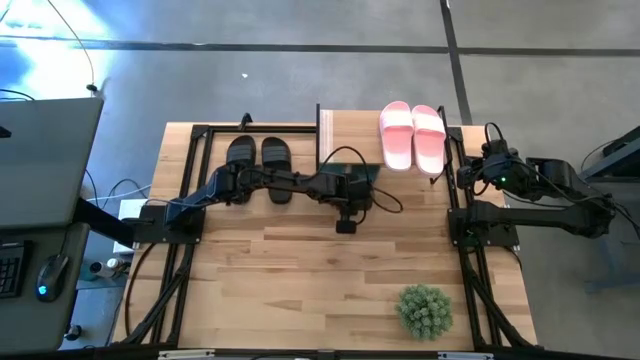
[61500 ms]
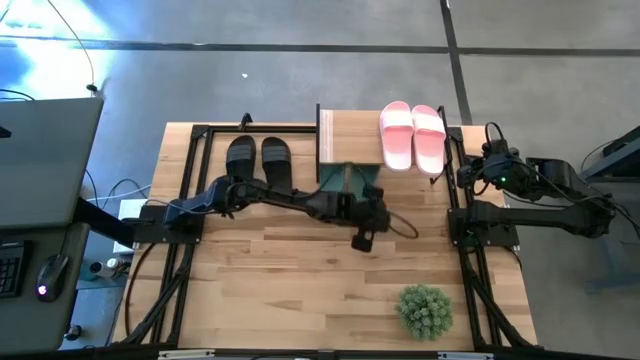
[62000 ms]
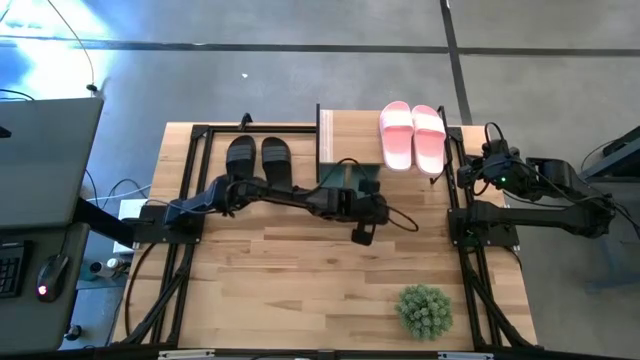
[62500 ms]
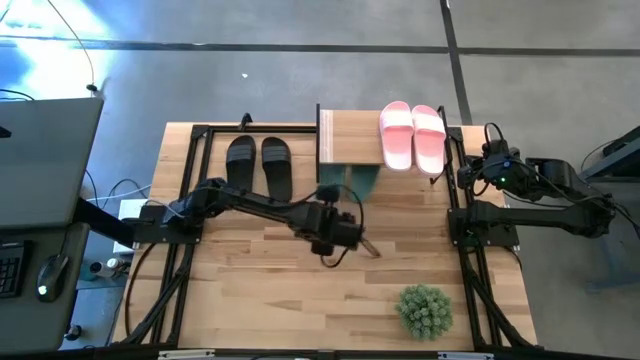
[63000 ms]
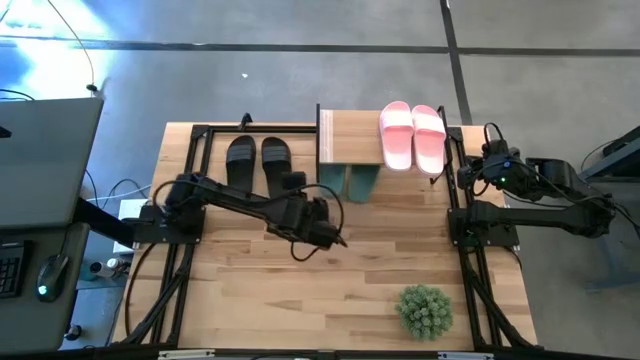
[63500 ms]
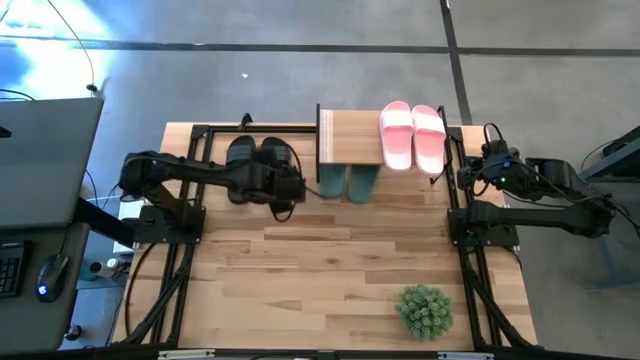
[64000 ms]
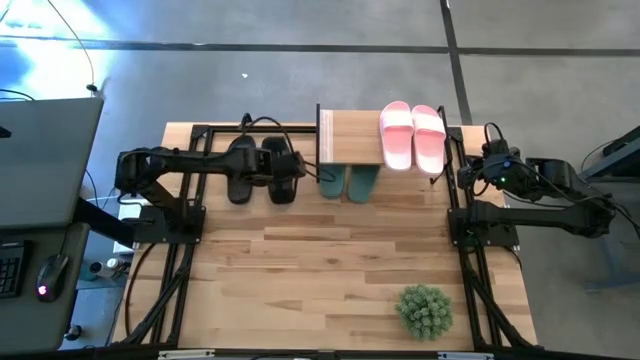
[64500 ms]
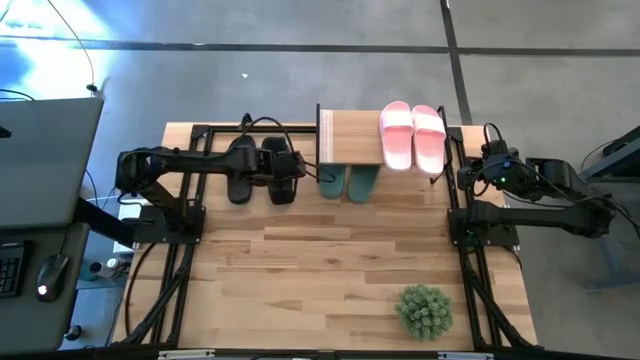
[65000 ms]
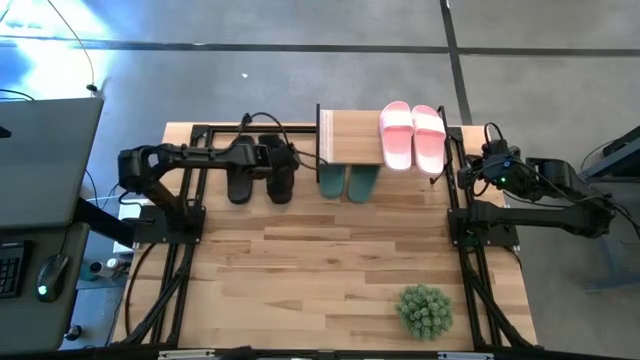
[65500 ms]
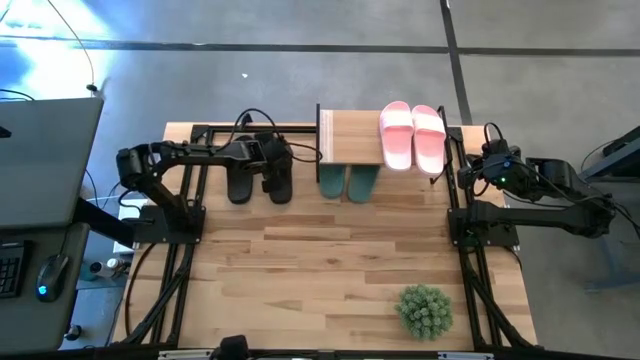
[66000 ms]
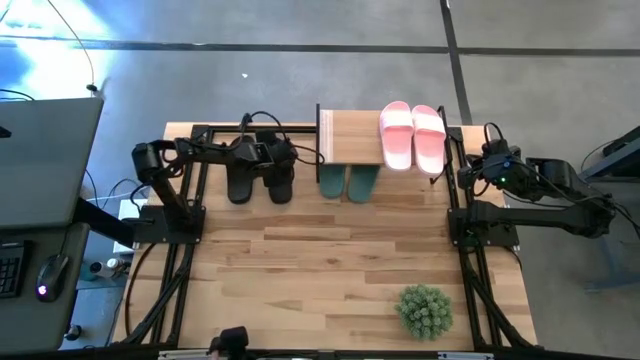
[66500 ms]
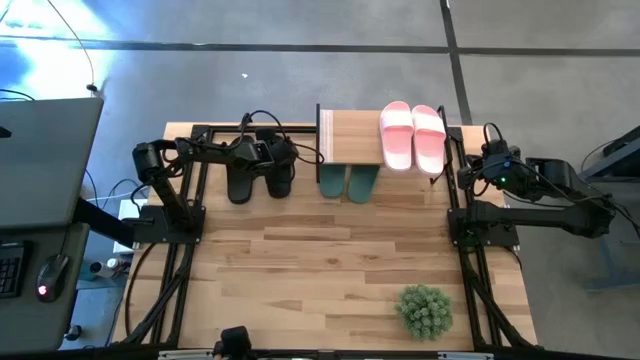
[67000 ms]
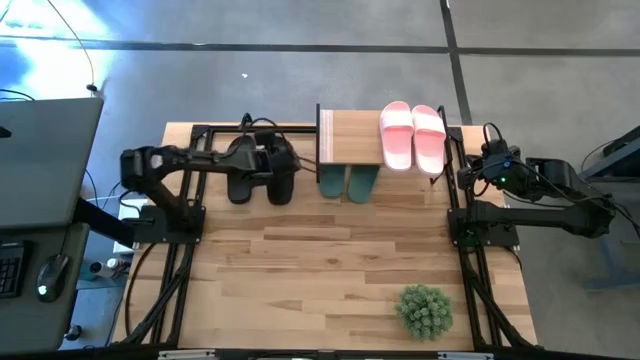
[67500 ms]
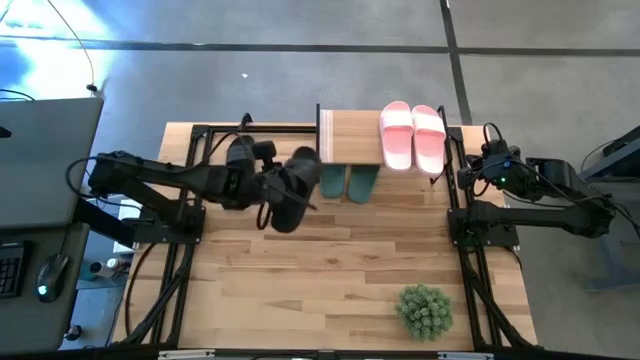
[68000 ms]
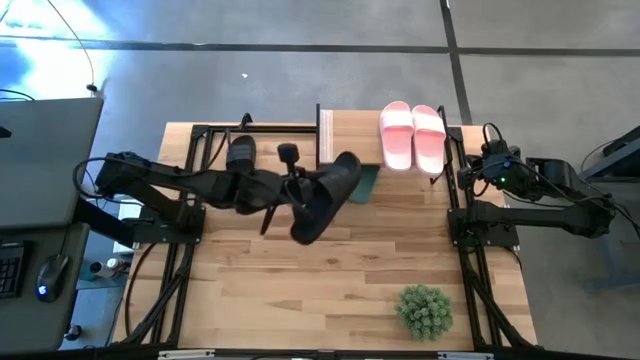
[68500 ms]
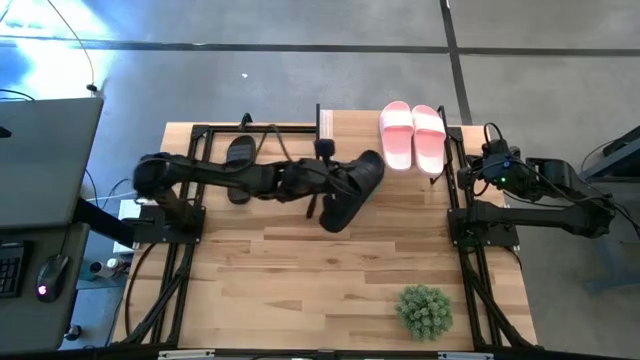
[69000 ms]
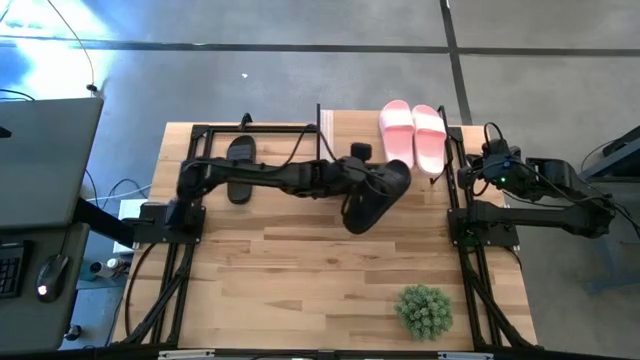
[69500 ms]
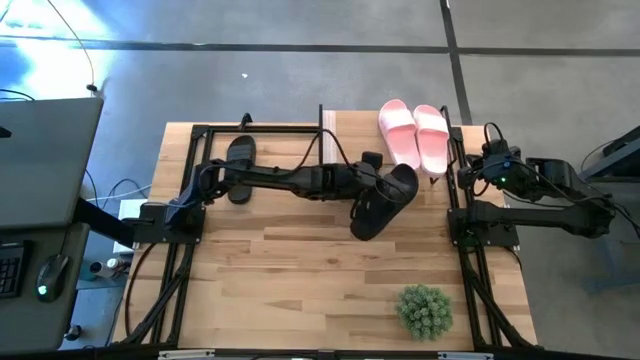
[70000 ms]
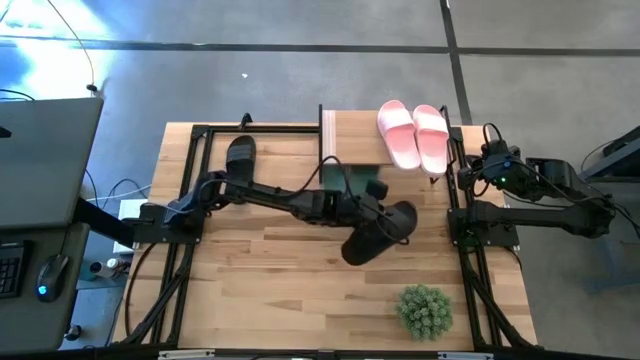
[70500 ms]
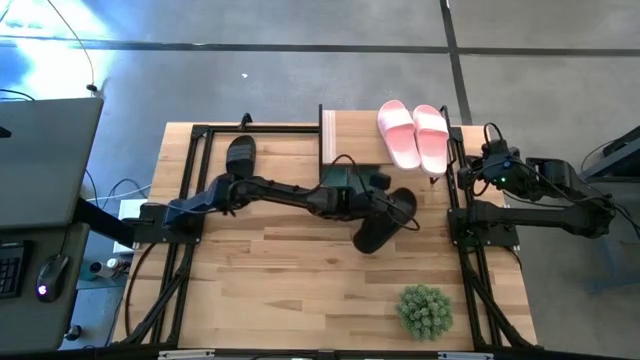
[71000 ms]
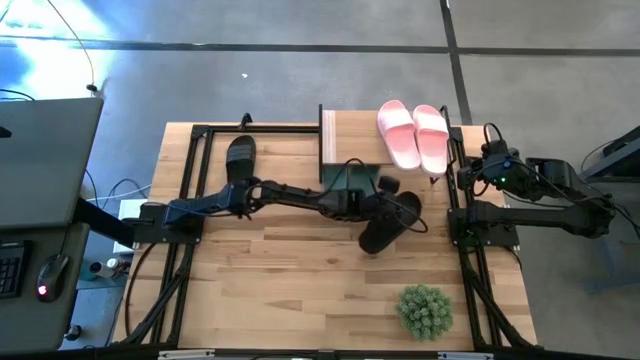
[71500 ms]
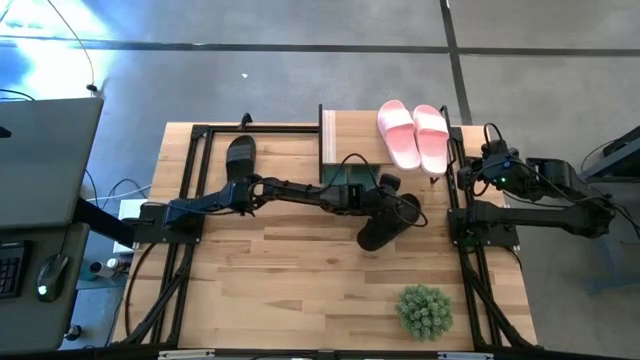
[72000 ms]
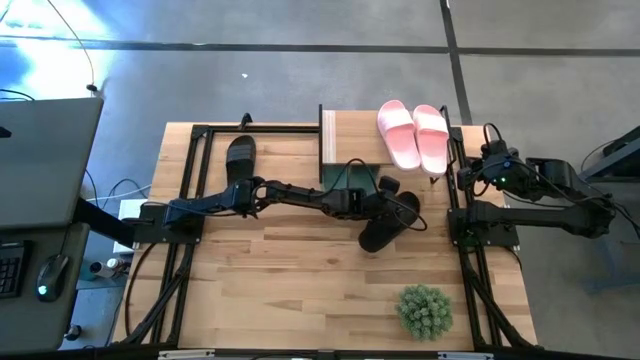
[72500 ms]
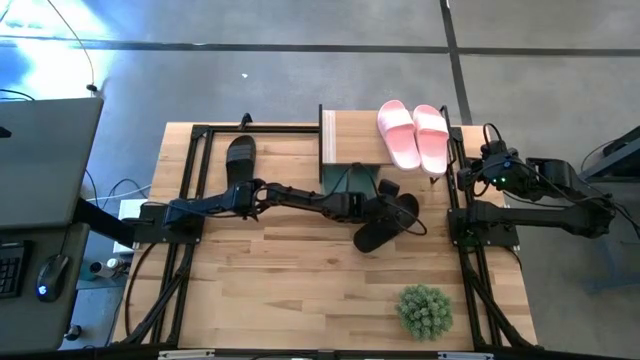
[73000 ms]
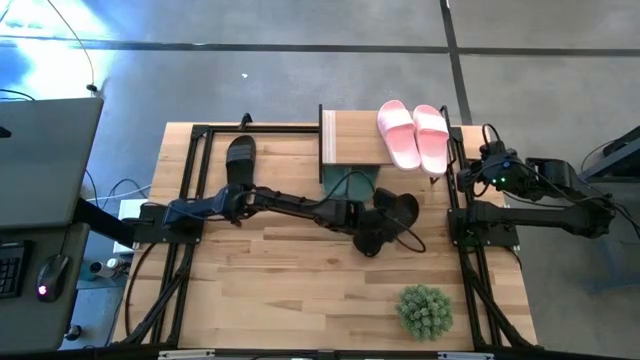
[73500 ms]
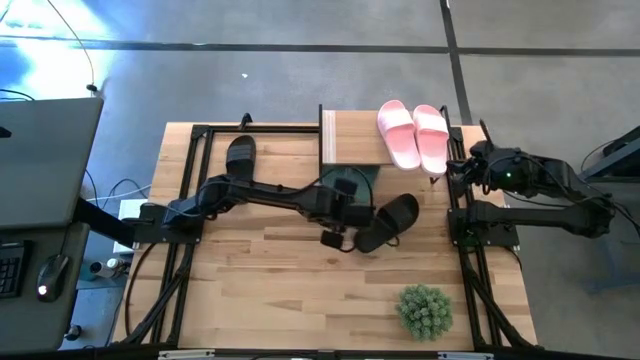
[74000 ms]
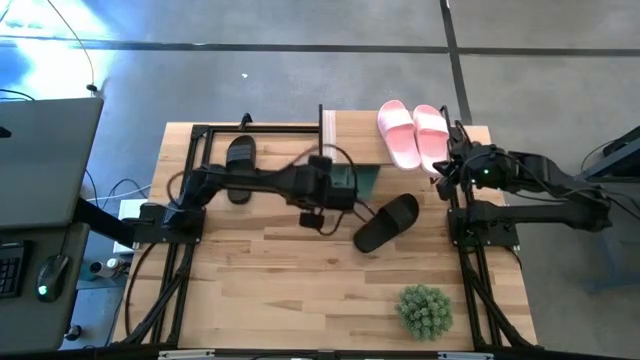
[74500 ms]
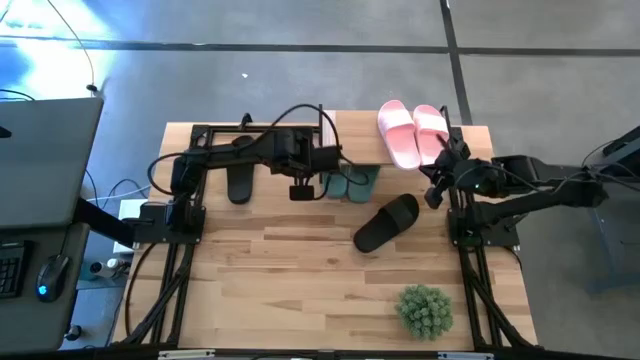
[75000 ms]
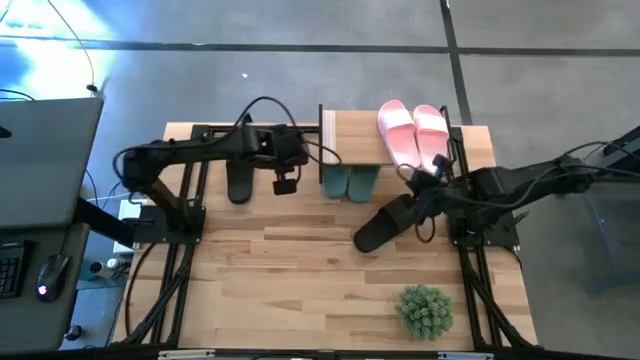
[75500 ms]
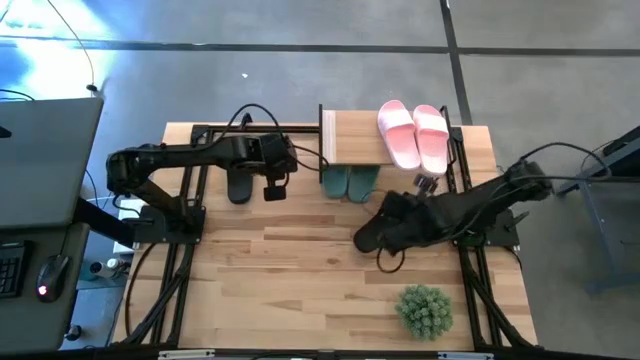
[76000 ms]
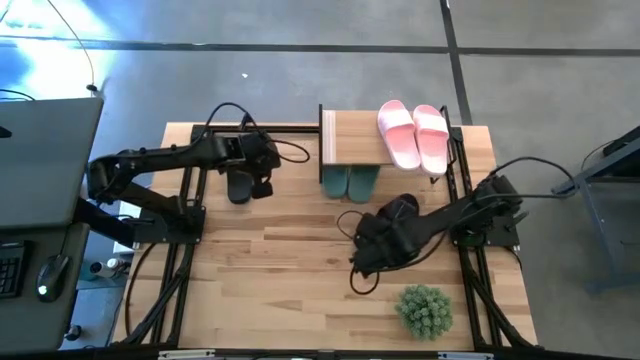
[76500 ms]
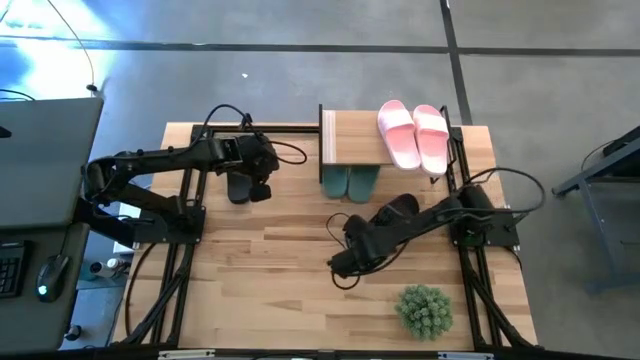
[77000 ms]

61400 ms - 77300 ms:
Task: Pick and place slides into the shelf
Put the right black slipper under the shelf
